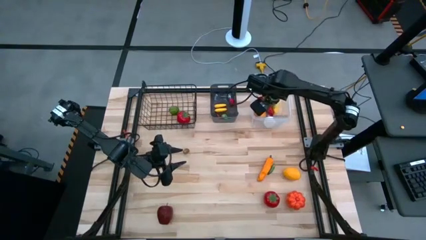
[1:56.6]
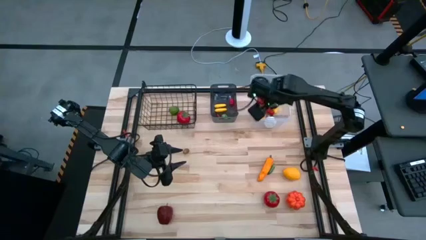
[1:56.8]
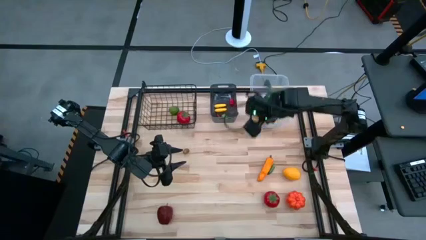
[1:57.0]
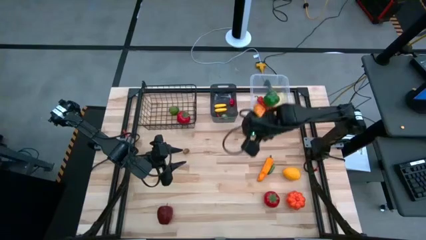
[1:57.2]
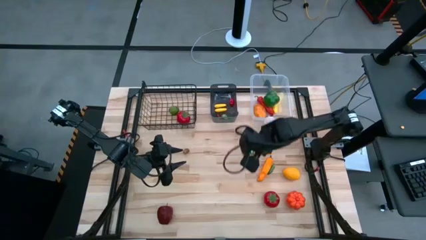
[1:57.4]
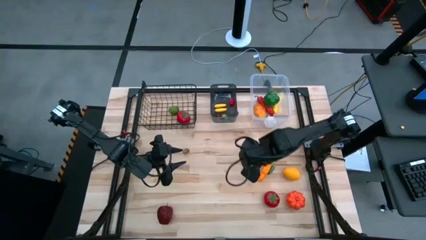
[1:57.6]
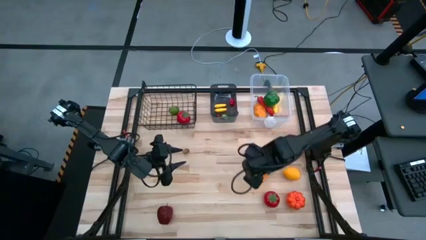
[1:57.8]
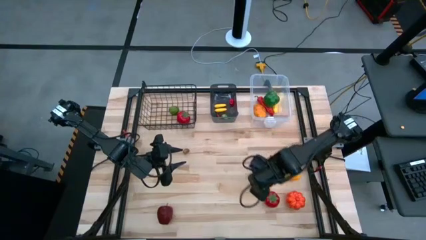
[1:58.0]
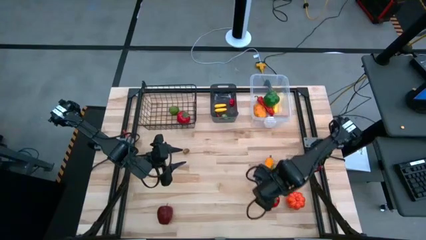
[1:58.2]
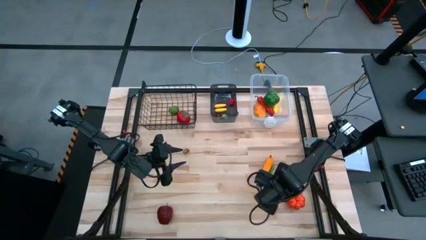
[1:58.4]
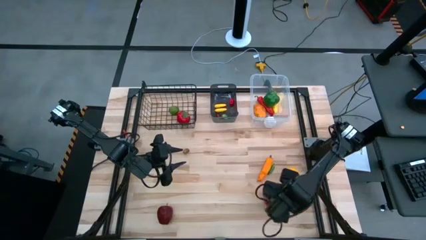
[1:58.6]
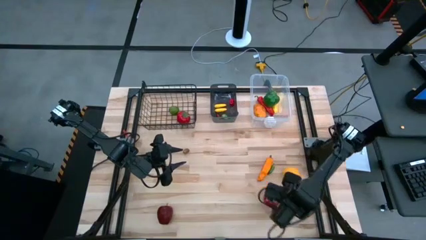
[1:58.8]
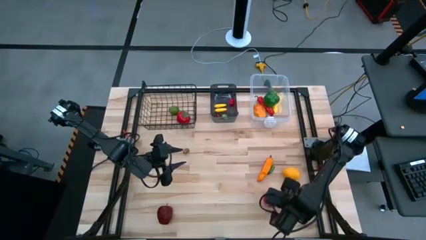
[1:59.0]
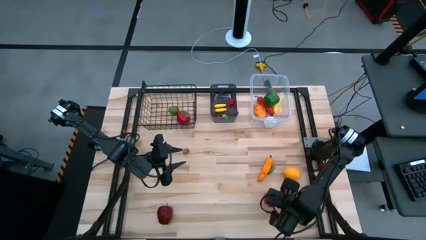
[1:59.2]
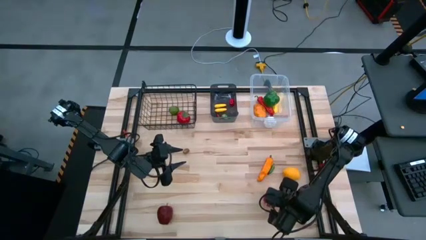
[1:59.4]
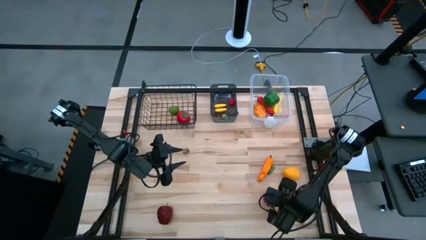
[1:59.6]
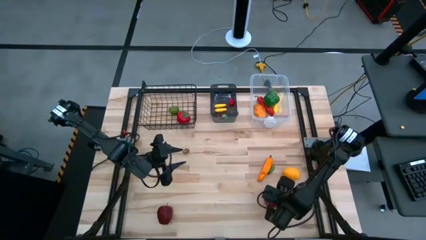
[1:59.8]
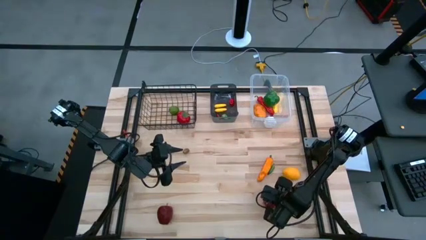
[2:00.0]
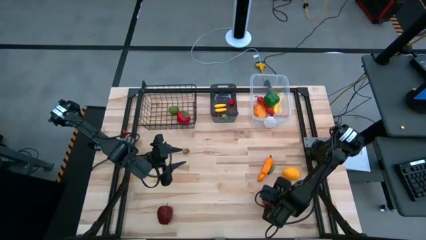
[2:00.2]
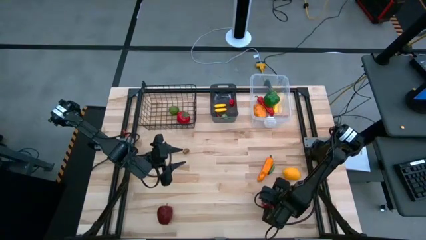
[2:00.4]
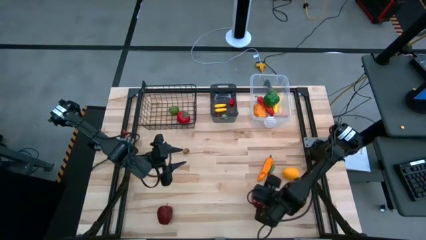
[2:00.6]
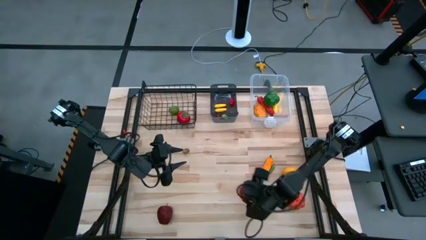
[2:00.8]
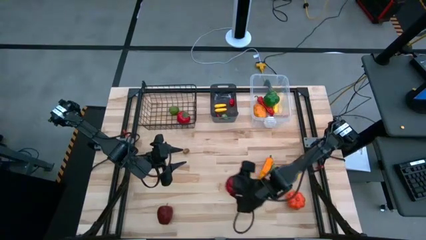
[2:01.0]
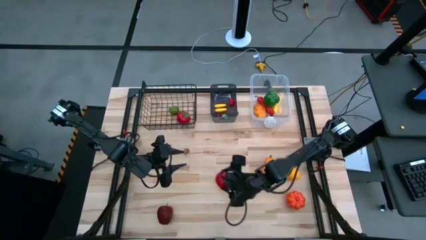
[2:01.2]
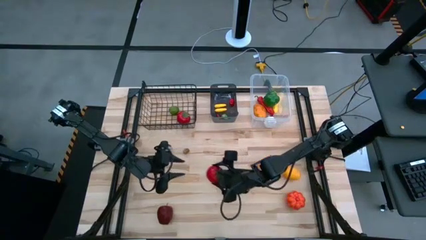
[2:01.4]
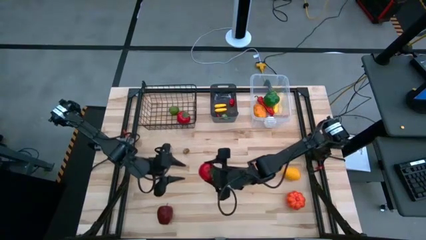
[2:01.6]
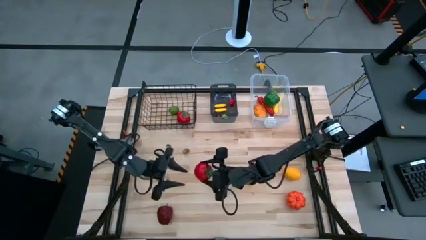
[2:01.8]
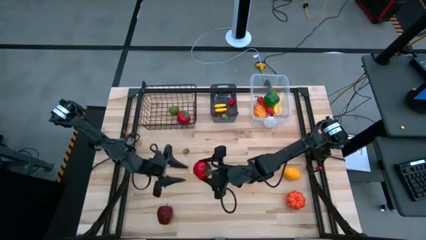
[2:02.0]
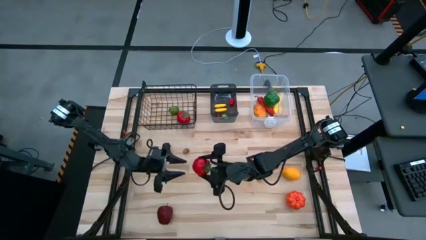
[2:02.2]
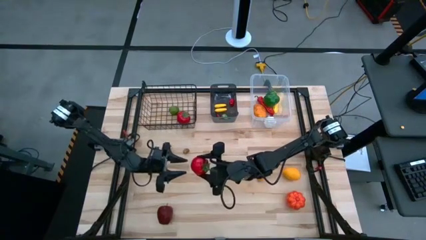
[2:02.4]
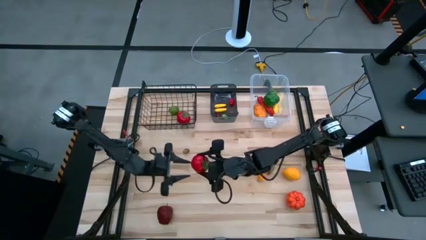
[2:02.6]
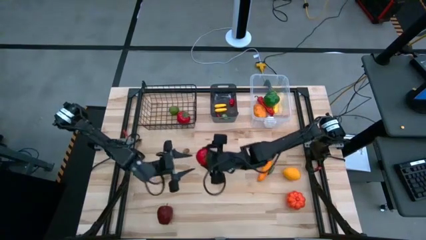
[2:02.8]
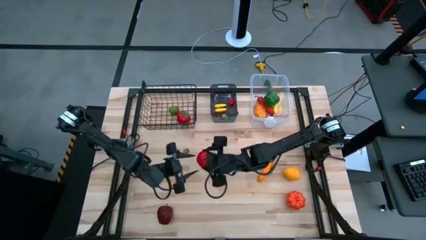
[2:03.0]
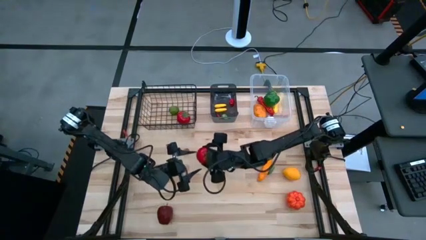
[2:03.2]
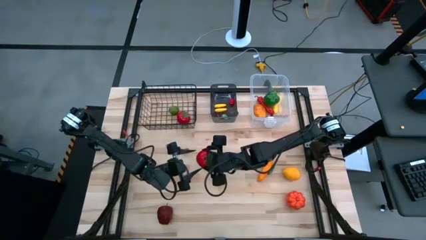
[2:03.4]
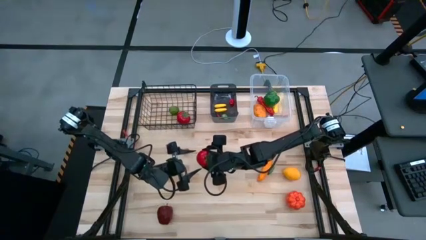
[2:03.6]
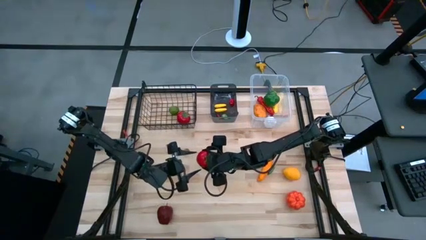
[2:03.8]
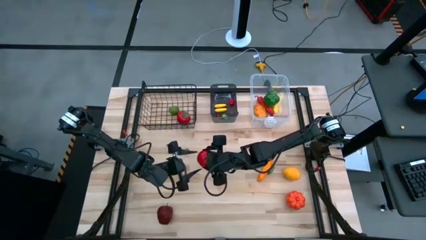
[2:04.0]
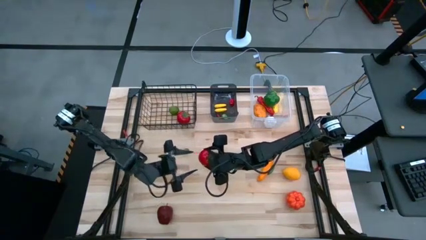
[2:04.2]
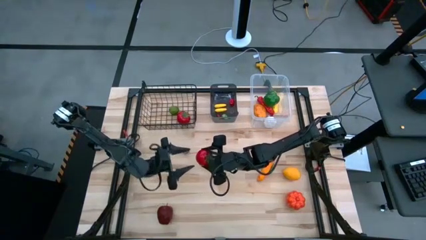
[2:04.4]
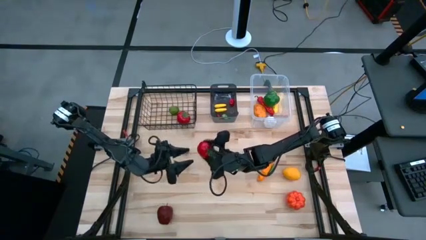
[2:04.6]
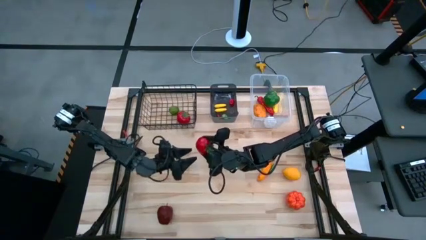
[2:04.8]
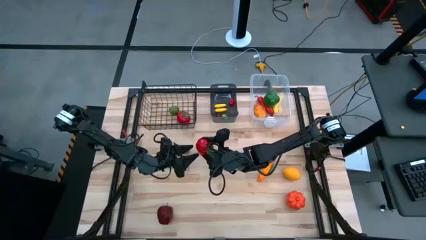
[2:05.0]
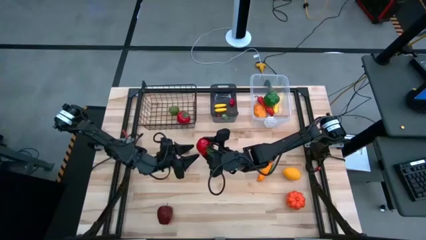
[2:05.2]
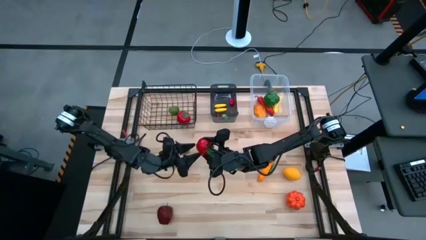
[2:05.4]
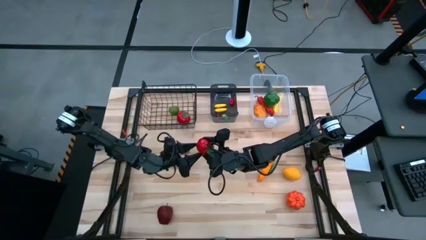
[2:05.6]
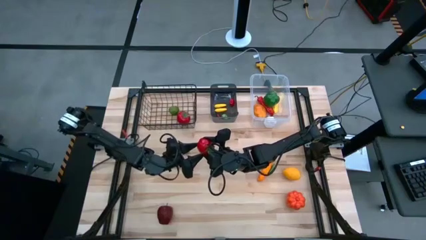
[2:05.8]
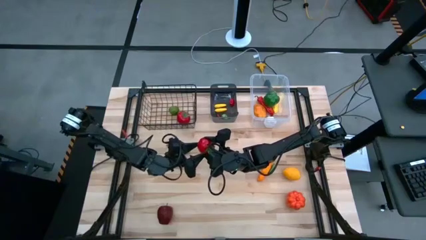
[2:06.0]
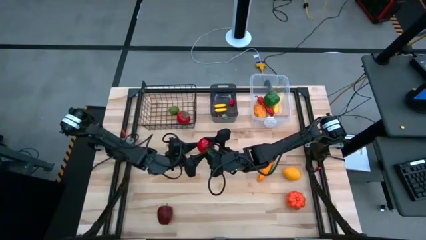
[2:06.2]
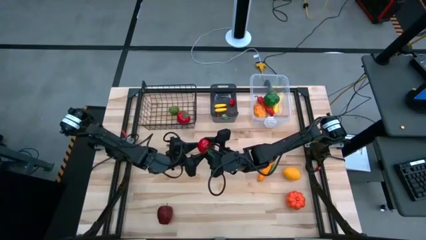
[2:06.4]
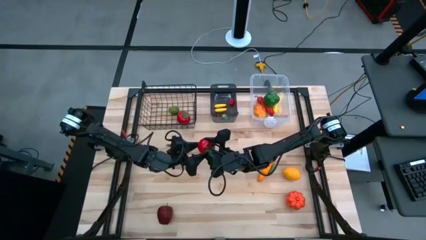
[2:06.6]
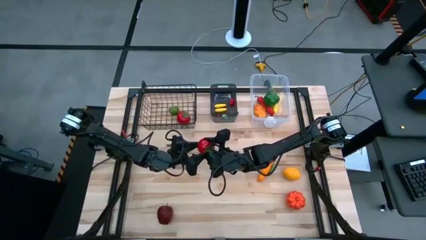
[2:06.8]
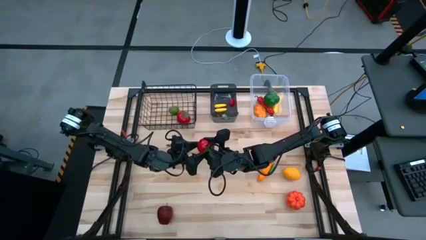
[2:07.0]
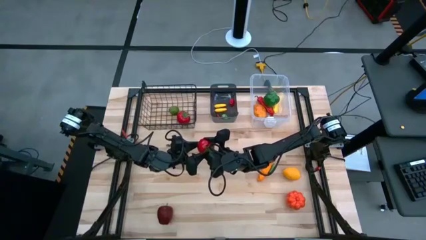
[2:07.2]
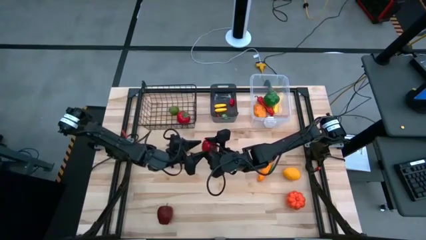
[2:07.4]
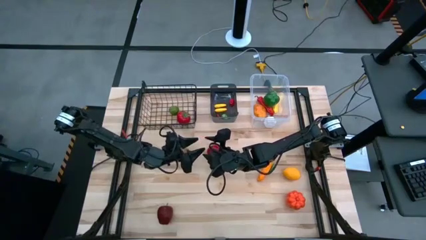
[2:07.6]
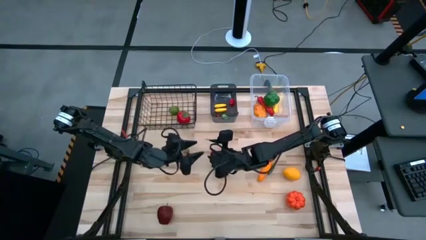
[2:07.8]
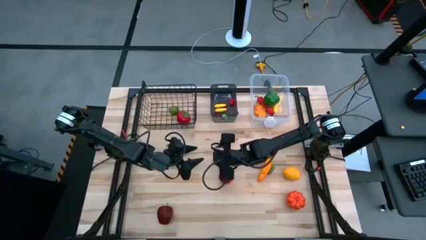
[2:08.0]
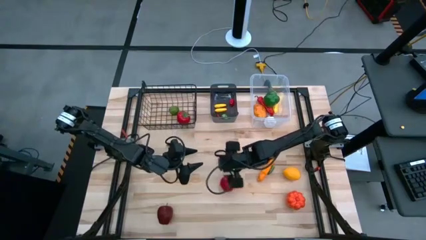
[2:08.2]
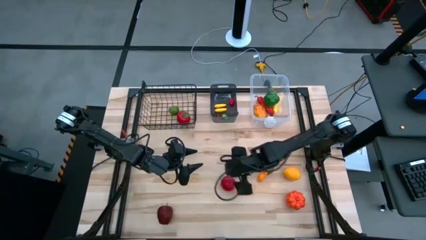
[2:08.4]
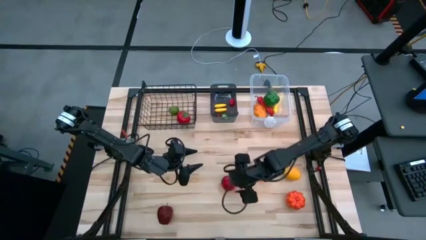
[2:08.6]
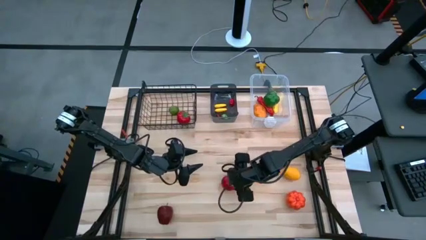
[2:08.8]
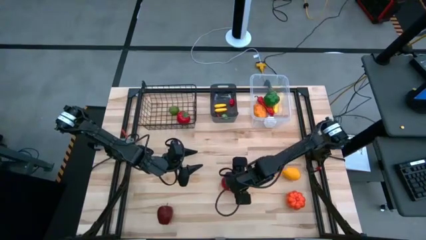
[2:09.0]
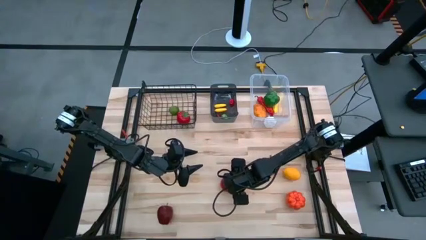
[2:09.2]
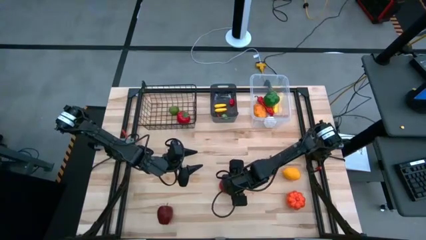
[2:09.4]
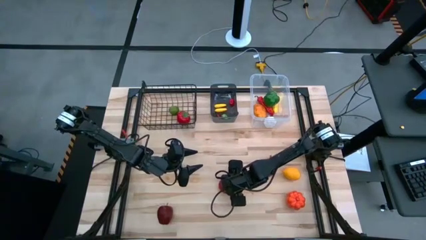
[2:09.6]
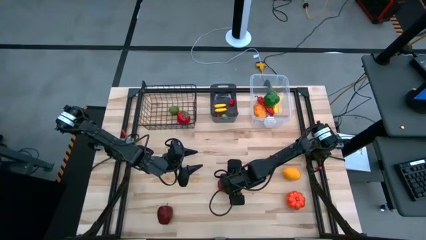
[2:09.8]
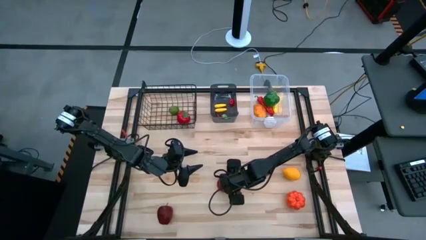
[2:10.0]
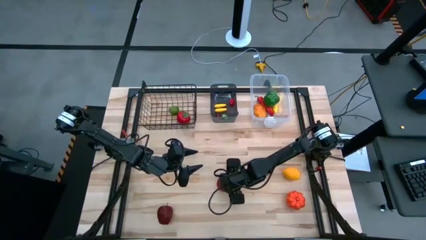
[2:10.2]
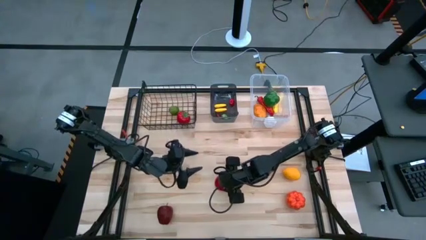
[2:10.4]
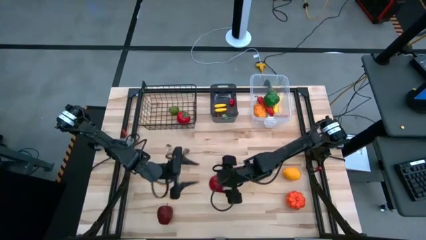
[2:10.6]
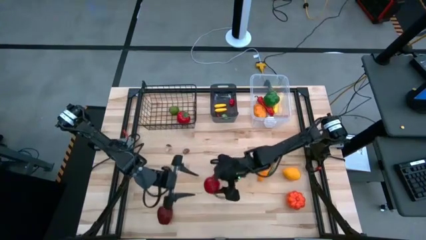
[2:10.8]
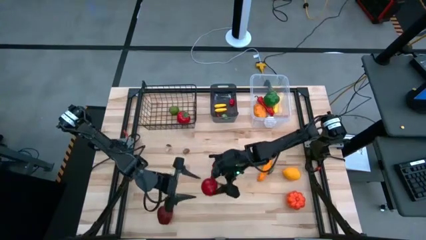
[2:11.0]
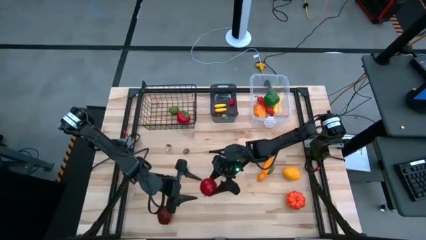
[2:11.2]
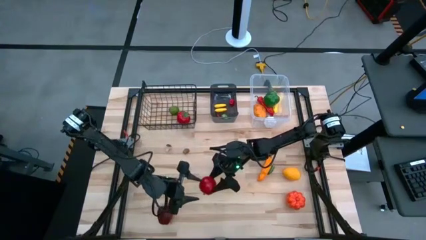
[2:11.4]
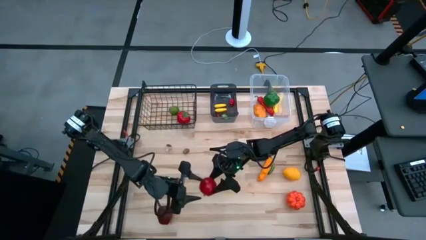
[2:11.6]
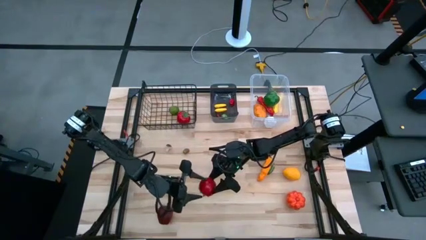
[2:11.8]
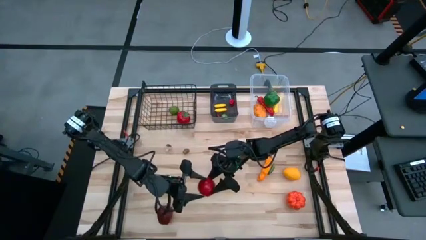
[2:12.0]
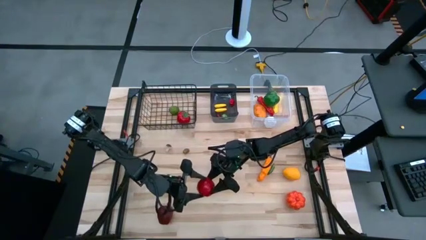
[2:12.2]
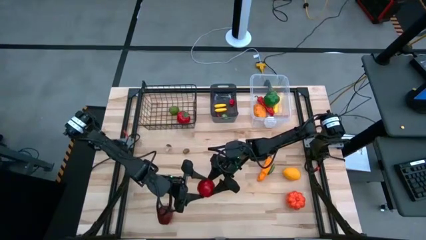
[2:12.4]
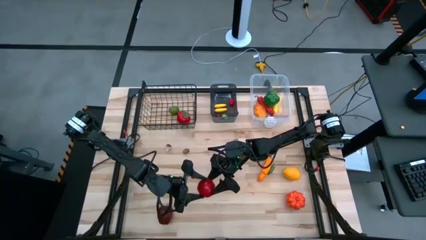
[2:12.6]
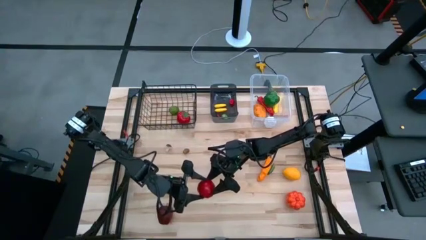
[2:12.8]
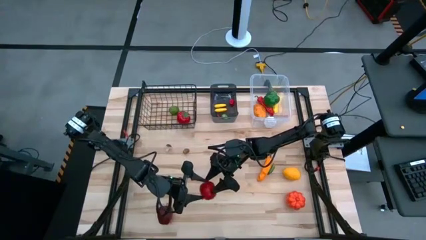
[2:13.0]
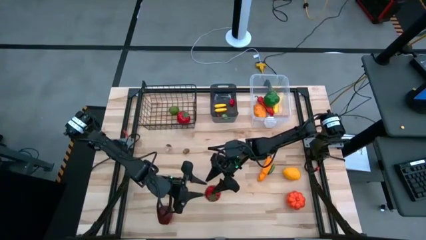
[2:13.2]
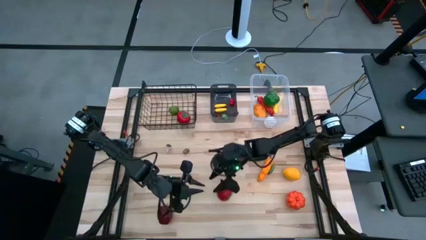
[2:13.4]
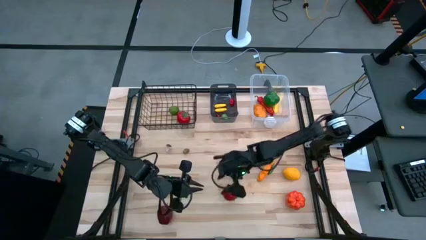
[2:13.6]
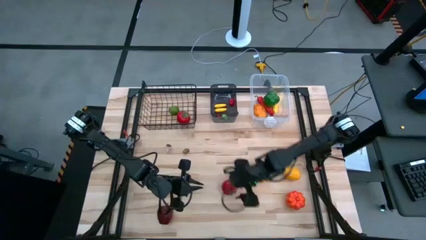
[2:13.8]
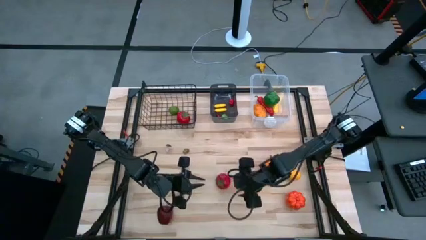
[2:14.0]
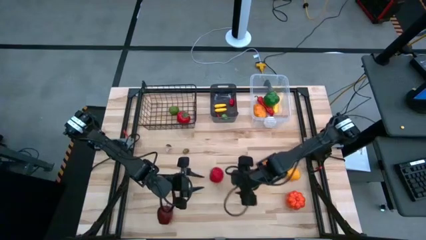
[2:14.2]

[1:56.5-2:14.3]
Task: Sort produce into baskets
Put the tomato into the black basket
